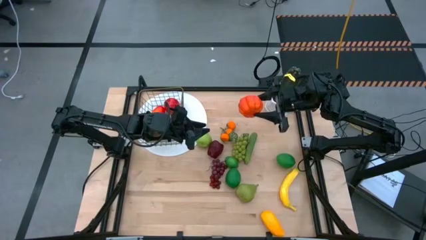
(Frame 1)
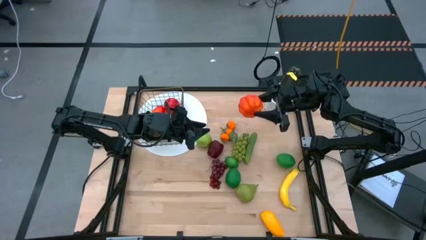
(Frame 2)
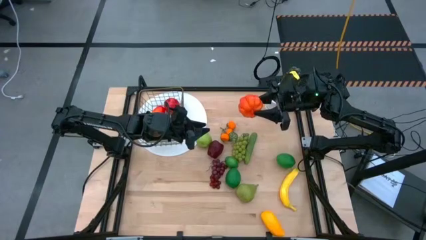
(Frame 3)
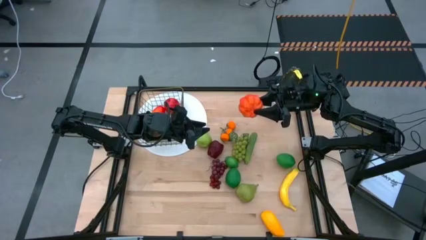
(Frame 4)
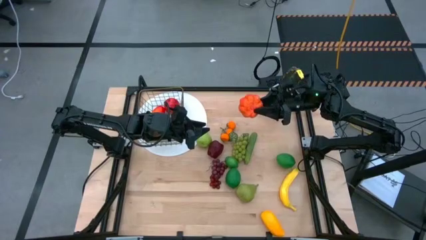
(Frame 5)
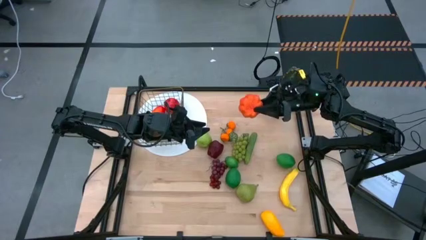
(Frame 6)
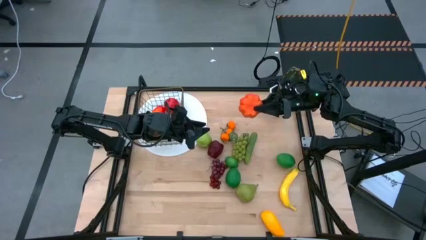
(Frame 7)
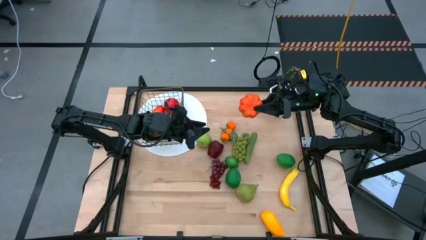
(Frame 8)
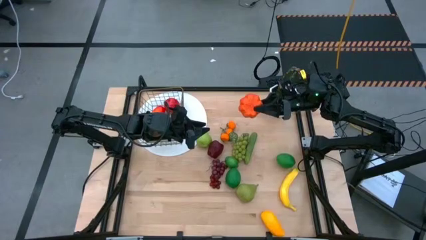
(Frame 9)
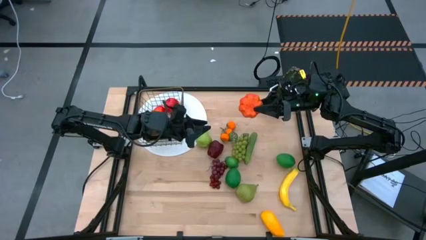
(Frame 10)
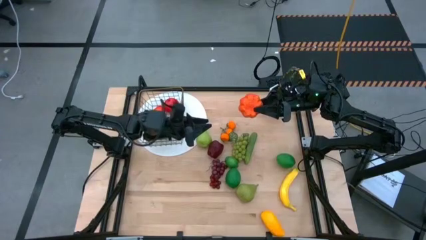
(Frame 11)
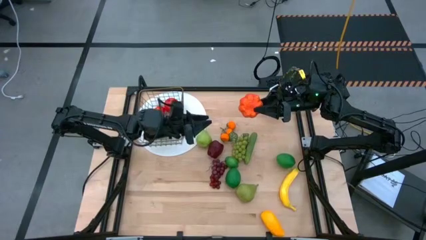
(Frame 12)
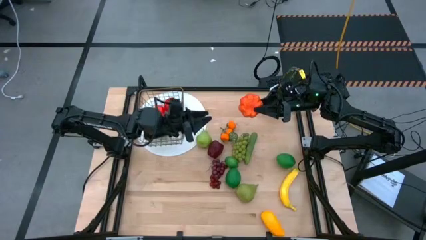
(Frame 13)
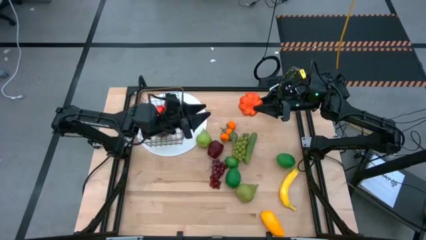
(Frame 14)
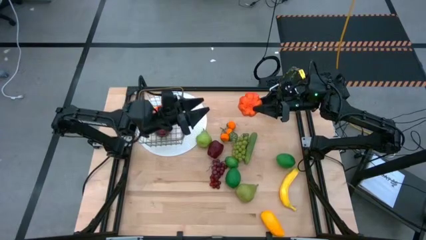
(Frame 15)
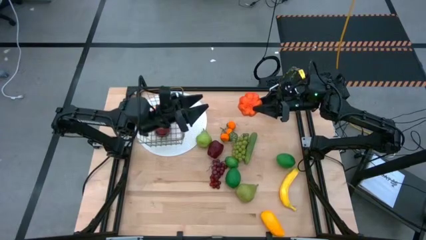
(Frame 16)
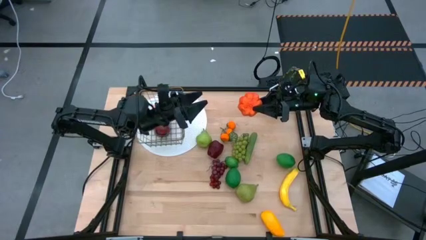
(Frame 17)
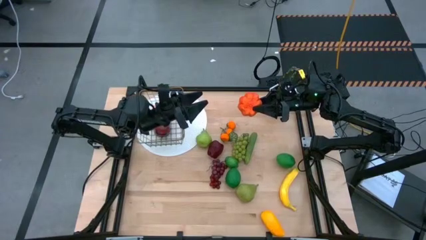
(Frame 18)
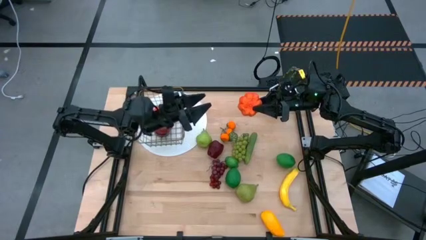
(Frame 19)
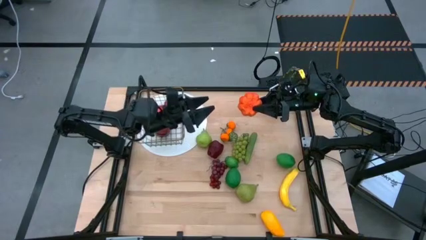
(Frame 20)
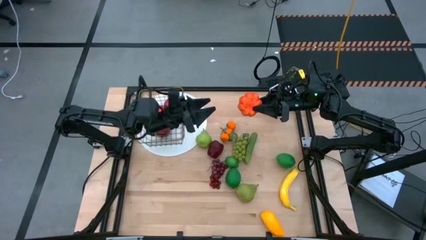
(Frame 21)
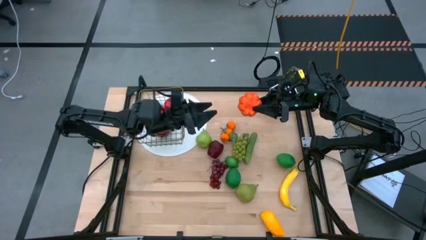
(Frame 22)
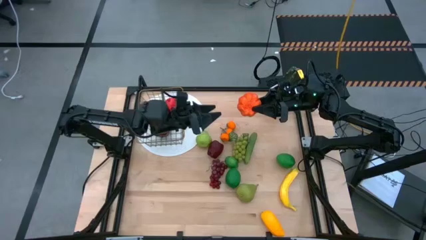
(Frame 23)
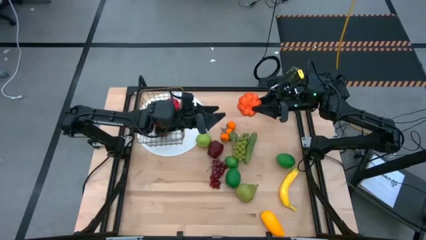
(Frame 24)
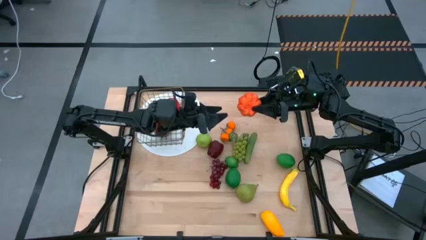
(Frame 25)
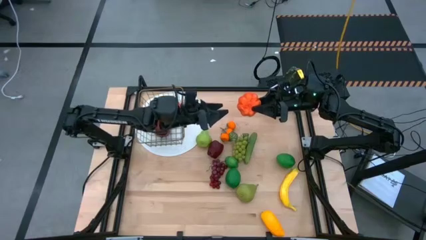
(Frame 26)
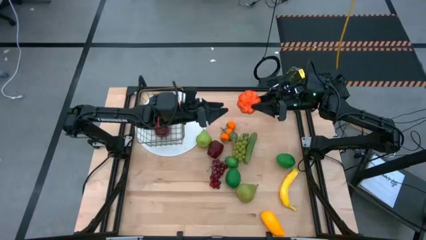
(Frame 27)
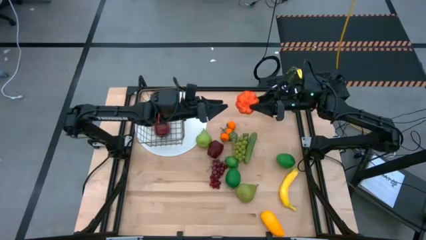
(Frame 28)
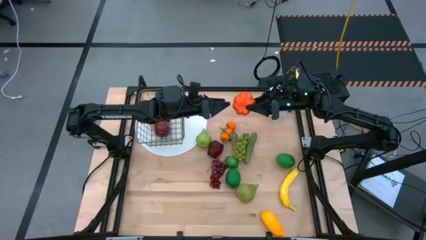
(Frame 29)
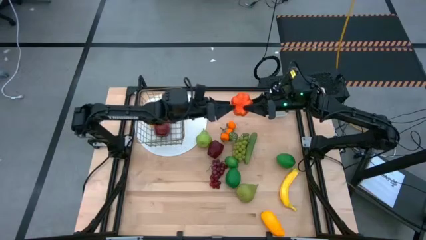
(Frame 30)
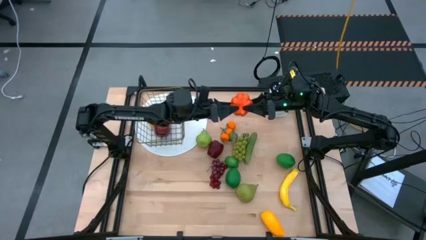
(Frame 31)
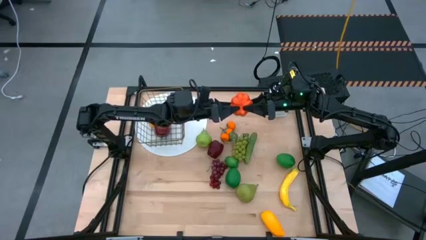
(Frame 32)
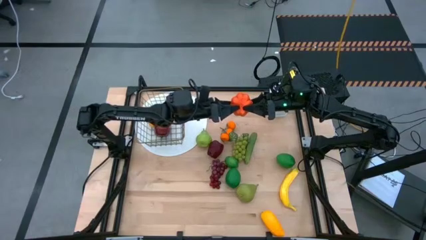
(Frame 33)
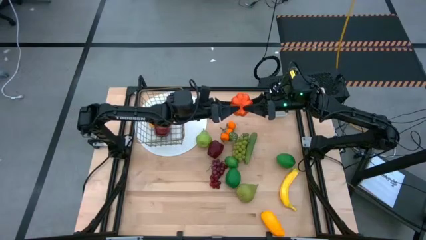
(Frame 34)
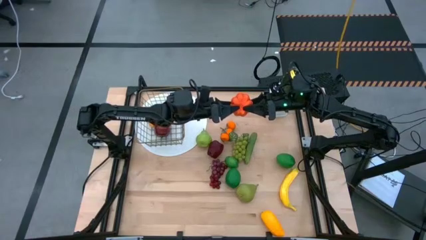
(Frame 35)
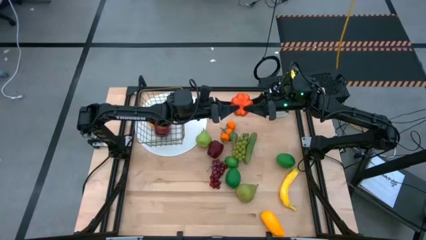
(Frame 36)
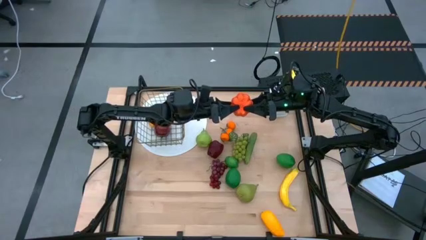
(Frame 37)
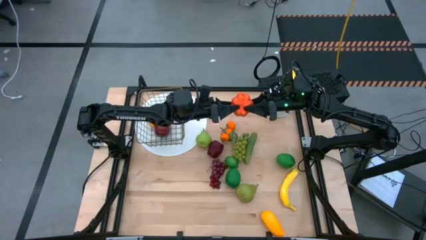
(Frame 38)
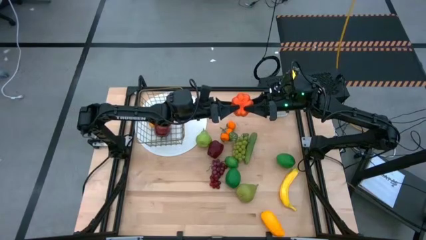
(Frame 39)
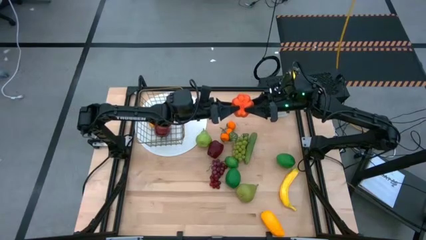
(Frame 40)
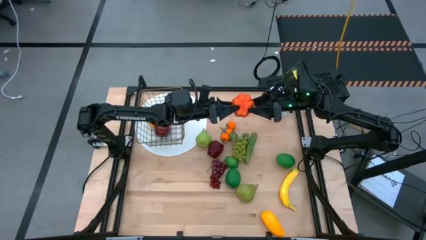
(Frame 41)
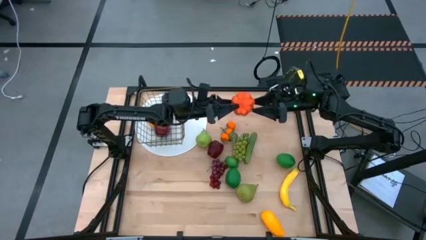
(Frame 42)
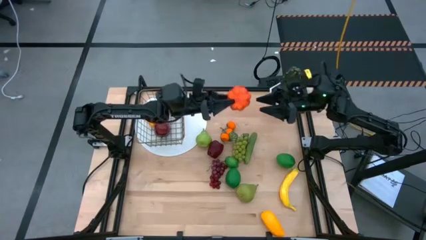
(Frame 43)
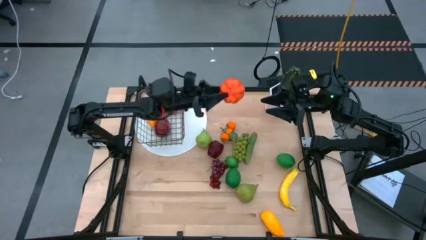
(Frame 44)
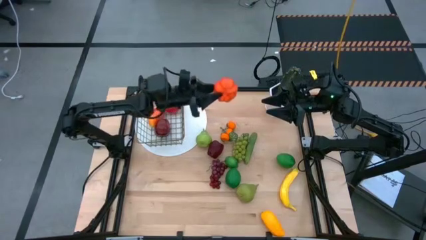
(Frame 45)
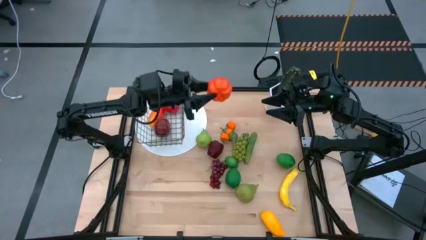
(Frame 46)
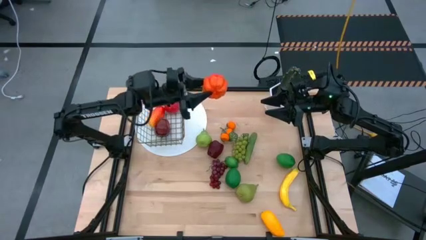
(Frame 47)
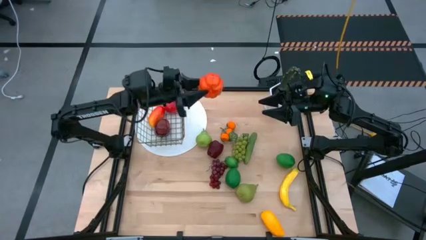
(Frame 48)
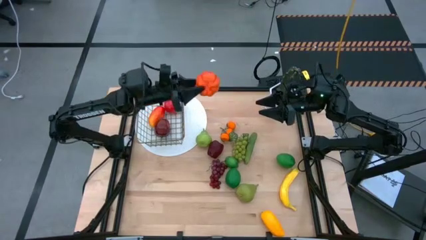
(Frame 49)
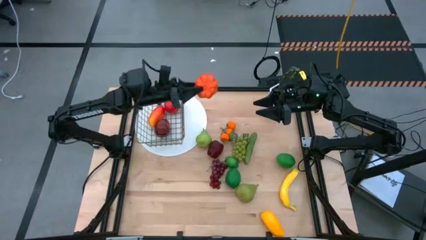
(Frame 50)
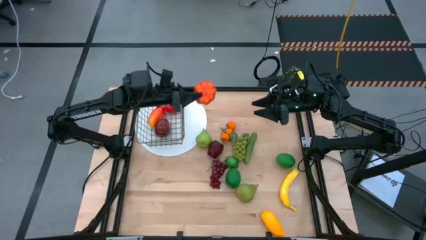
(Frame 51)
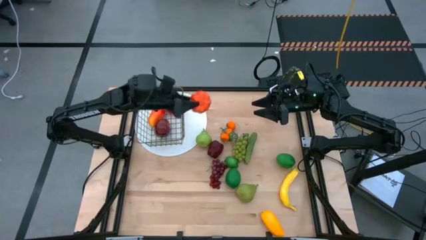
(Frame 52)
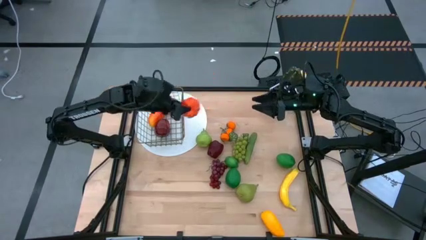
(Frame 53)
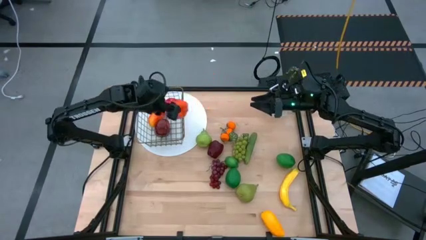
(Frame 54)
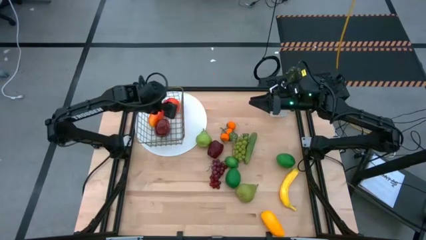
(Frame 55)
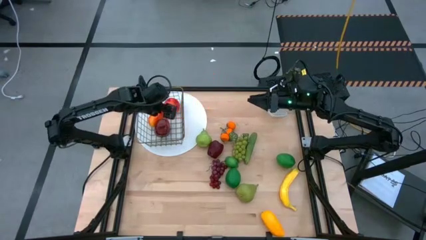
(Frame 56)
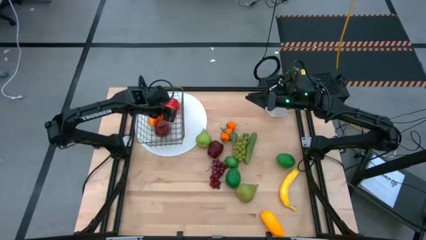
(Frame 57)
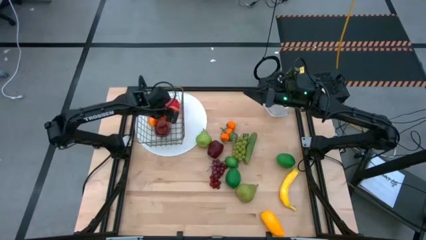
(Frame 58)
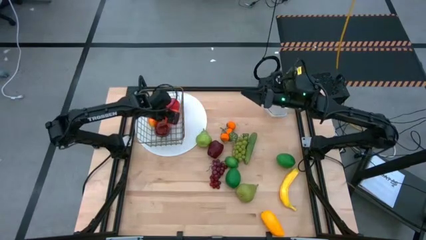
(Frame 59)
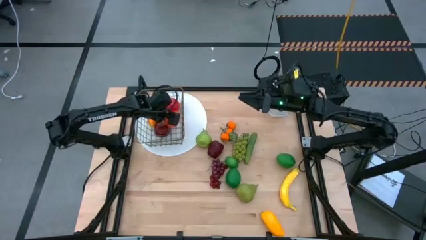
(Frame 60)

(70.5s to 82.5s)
Task: Build produce basket
Put the orange pumpkin into the wire basket

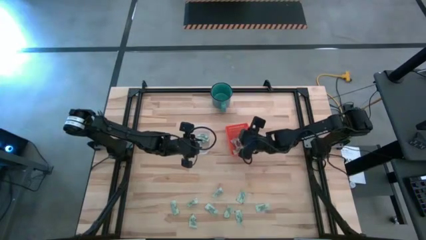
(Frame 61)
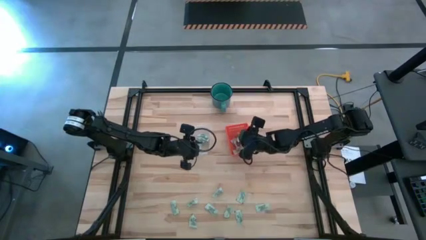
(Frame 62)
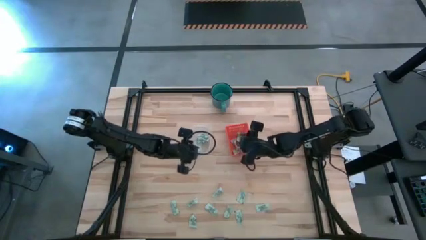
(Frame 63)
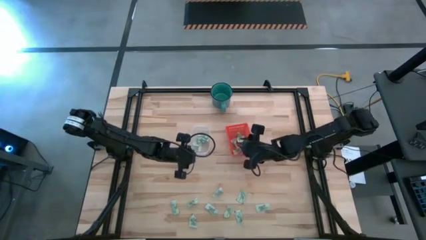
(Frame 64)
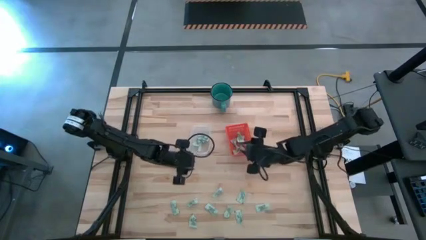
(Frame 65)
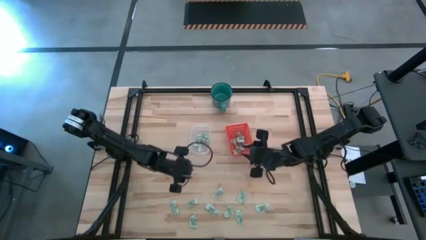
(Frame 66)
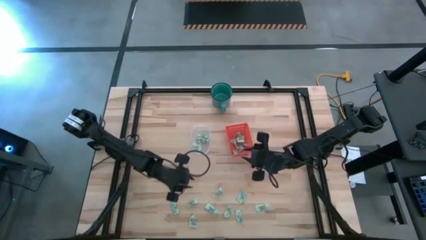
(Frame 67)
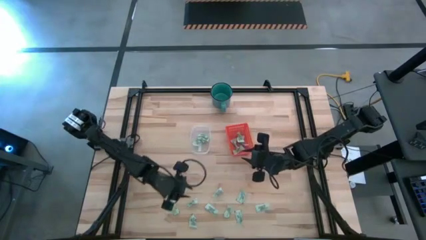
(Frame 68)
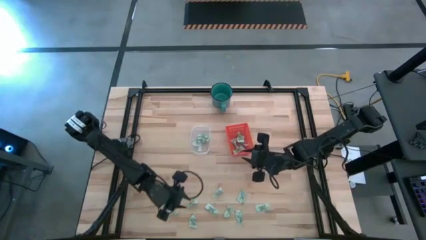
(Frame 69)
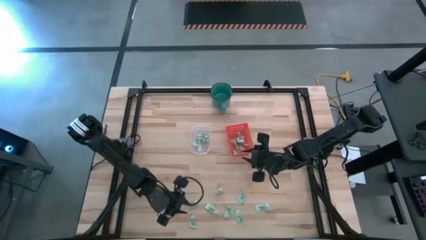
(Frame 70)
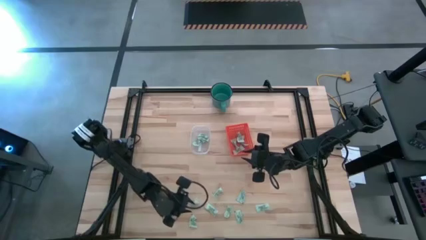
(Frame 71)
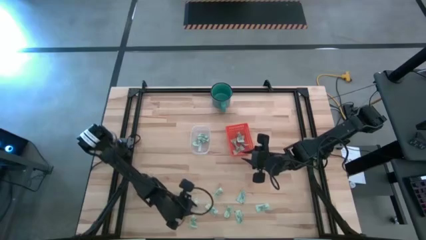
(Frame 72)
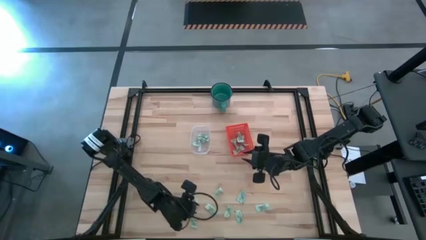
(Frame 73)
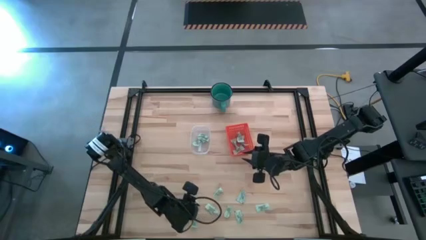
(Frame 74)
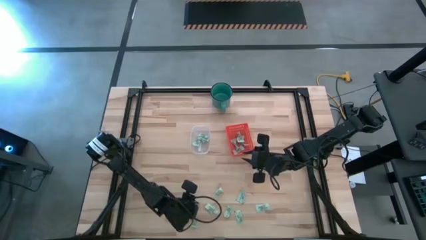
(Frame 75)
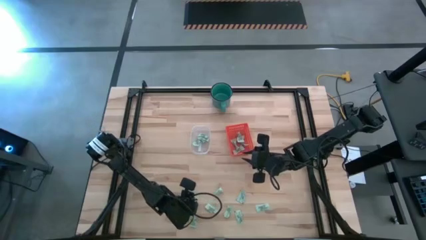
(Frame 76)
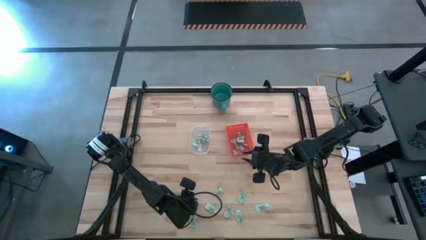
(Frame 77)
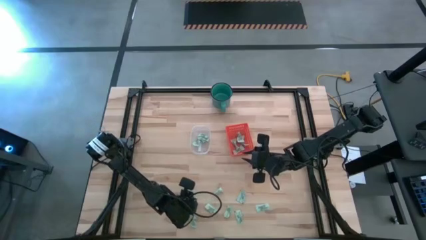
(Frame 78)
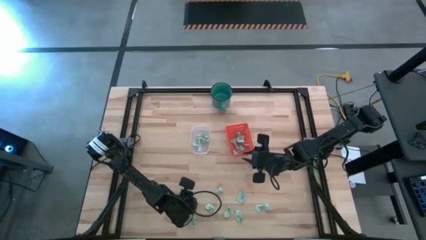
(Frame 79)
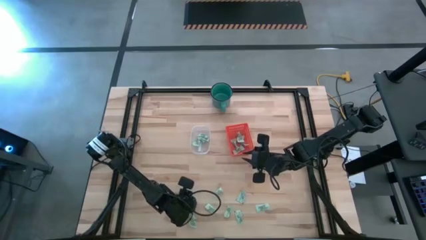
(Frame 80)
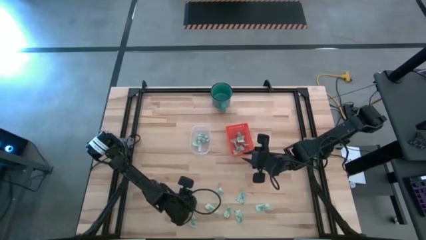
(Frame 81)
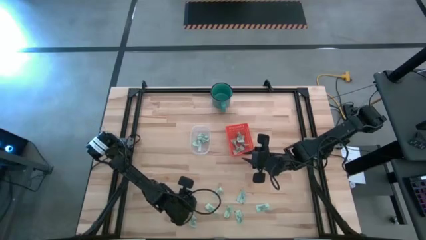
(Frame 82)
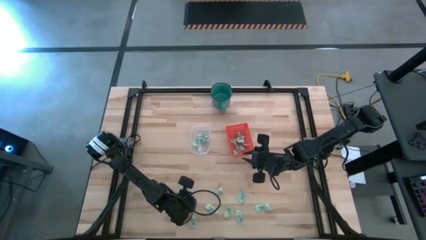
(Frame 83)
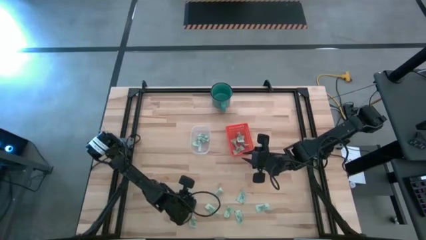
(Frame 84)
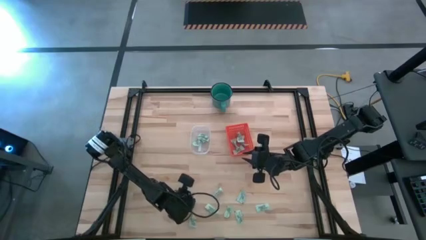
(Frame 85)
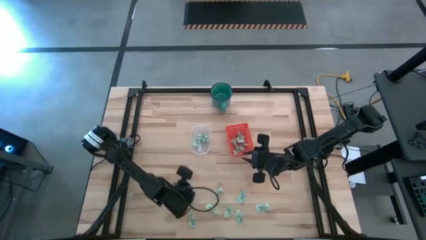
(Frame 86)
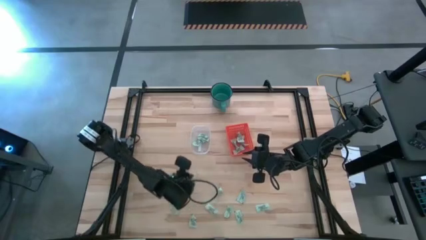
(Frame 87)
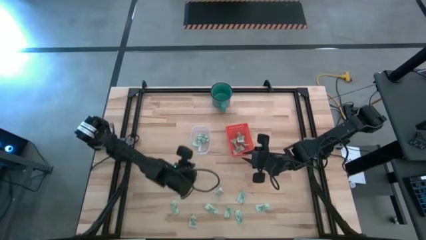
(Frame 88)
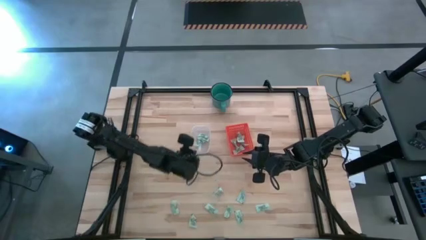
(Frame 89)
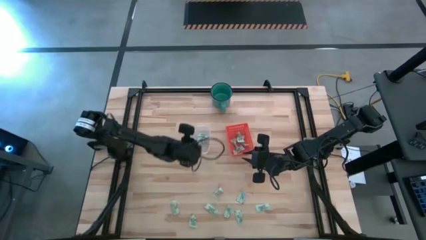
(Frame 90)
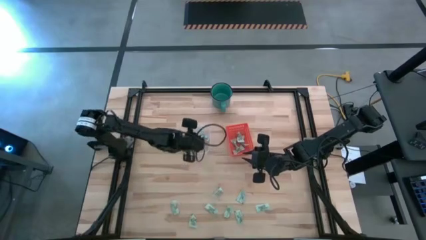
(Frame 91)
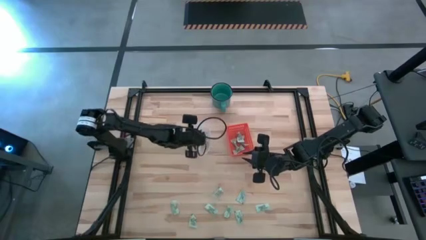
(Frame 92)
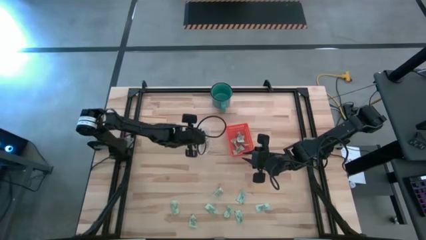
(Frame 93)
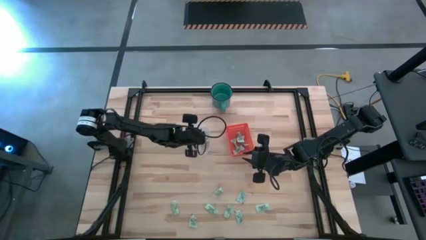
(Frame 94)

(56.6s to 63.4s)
Task: Pick and place items into bin
Put the stevia packet into the transparent bin
